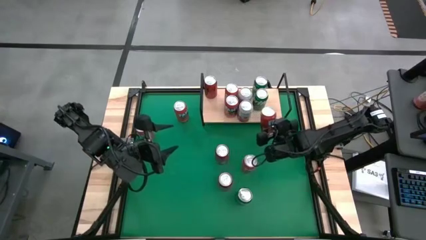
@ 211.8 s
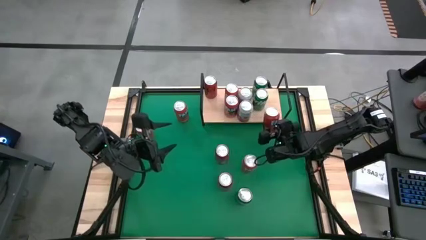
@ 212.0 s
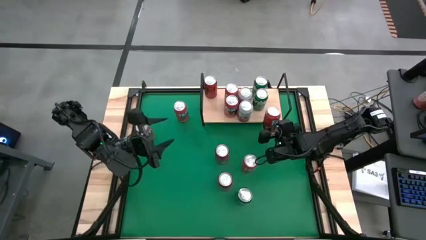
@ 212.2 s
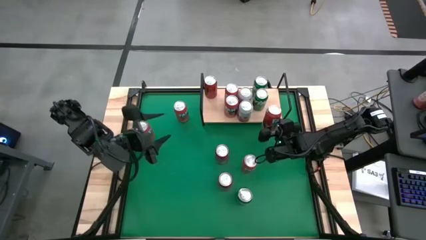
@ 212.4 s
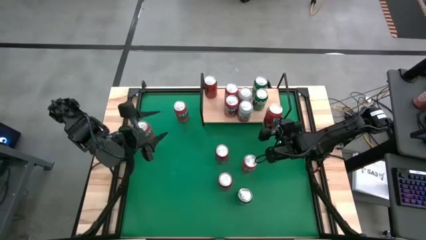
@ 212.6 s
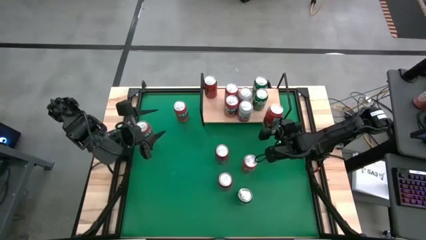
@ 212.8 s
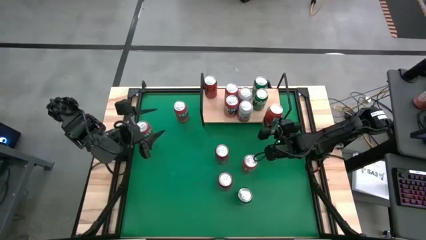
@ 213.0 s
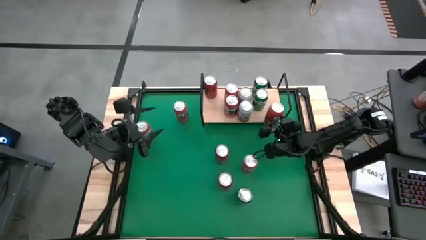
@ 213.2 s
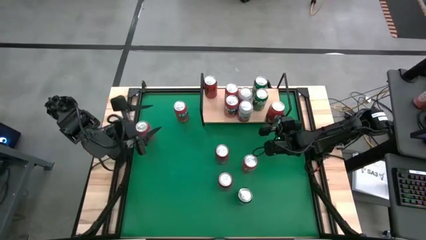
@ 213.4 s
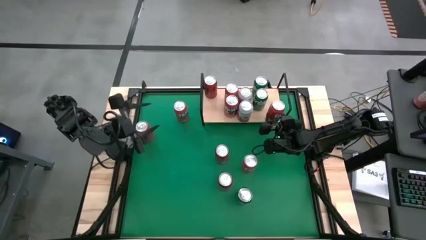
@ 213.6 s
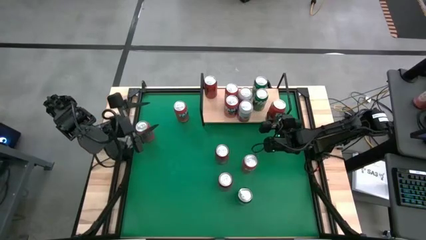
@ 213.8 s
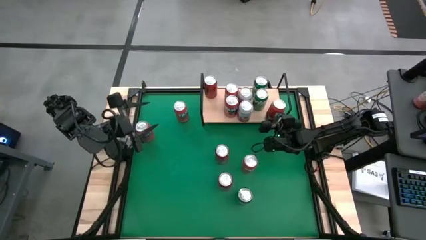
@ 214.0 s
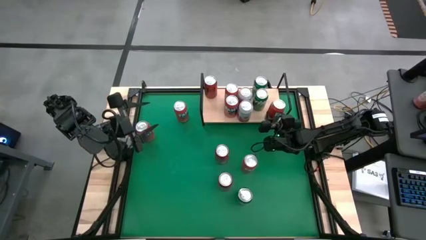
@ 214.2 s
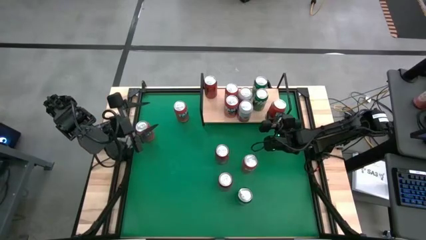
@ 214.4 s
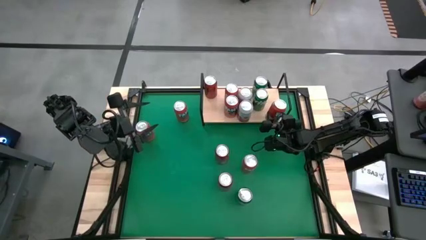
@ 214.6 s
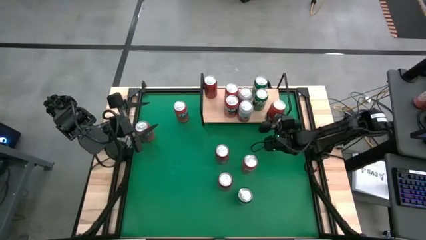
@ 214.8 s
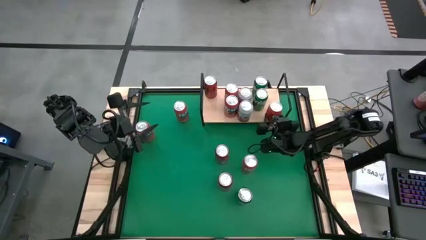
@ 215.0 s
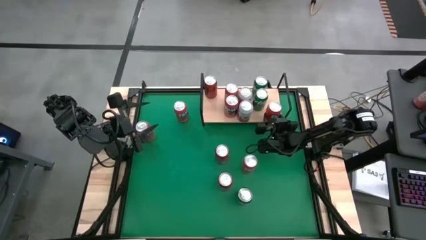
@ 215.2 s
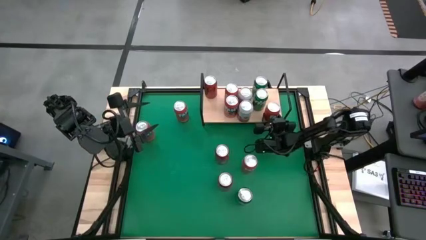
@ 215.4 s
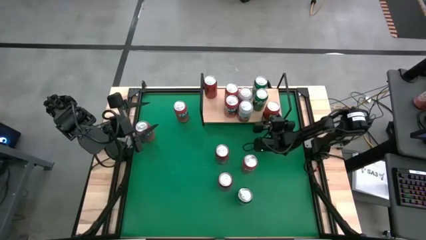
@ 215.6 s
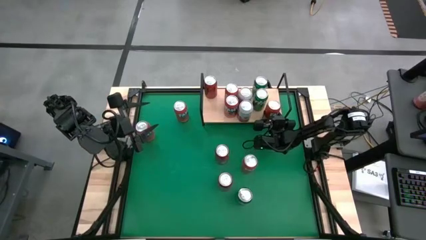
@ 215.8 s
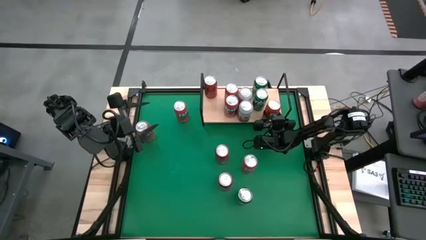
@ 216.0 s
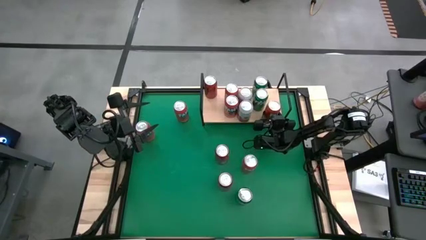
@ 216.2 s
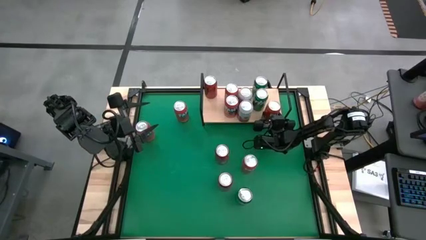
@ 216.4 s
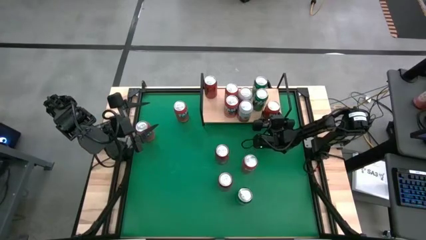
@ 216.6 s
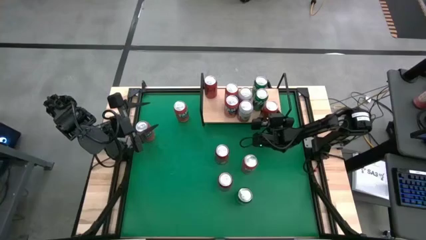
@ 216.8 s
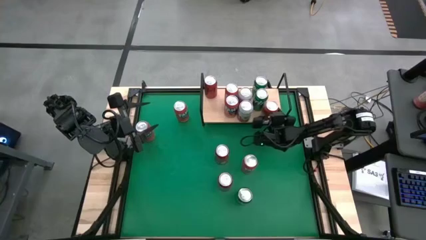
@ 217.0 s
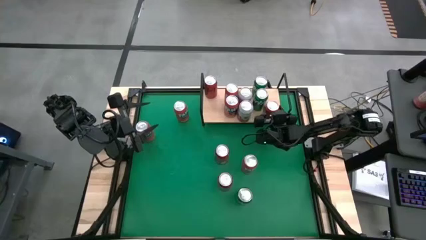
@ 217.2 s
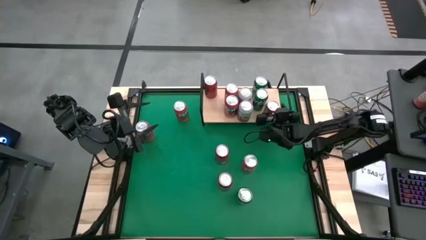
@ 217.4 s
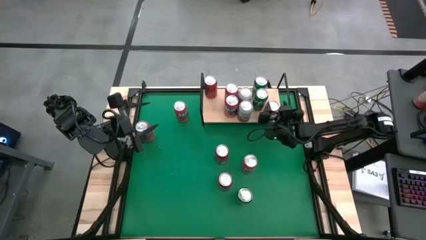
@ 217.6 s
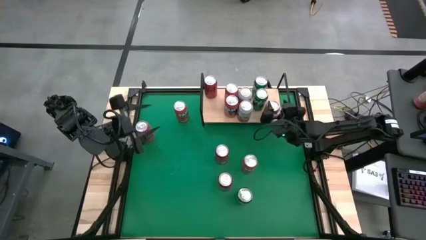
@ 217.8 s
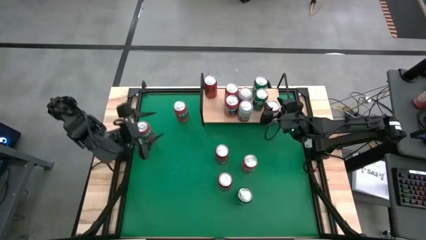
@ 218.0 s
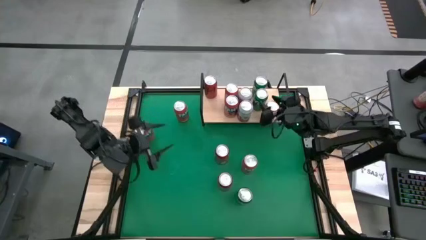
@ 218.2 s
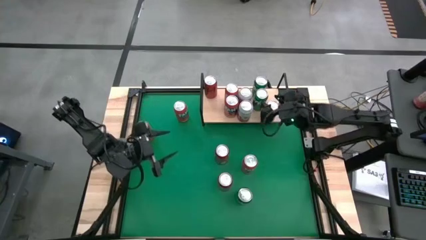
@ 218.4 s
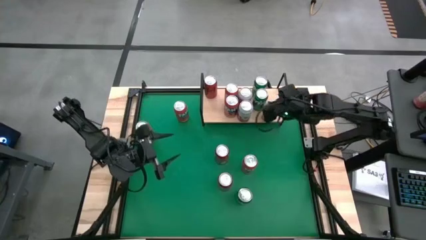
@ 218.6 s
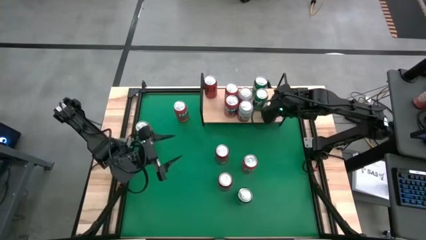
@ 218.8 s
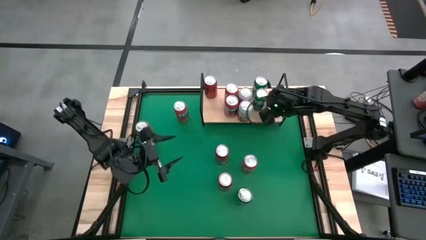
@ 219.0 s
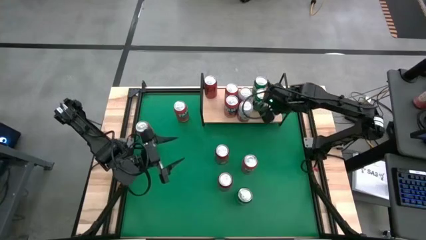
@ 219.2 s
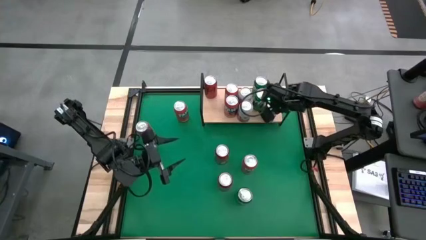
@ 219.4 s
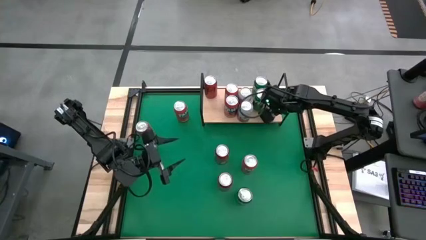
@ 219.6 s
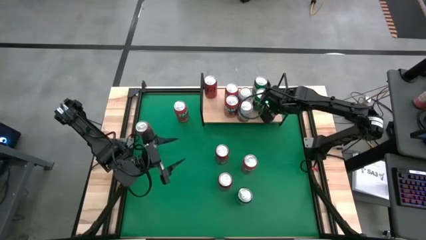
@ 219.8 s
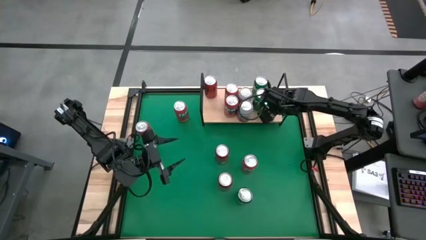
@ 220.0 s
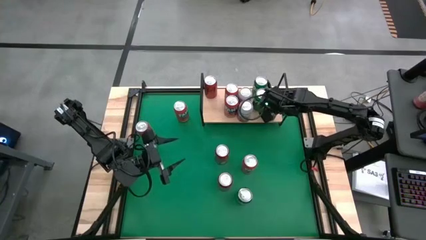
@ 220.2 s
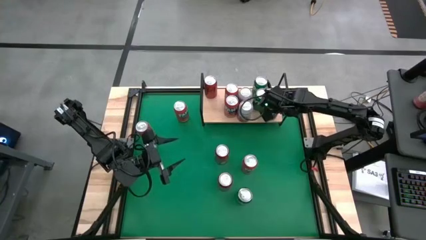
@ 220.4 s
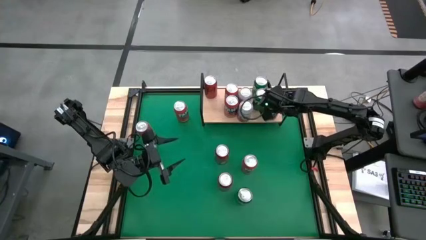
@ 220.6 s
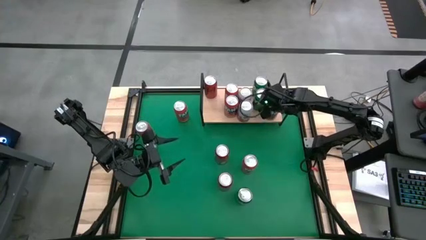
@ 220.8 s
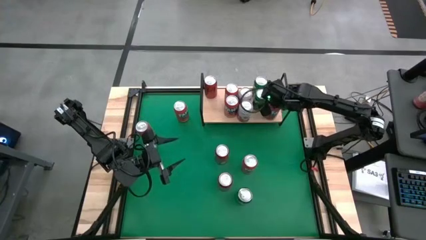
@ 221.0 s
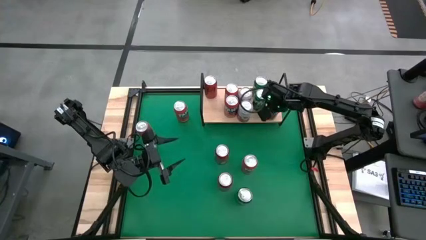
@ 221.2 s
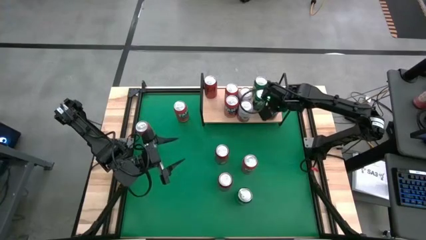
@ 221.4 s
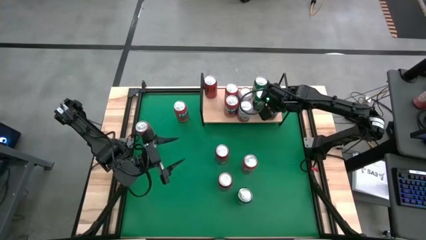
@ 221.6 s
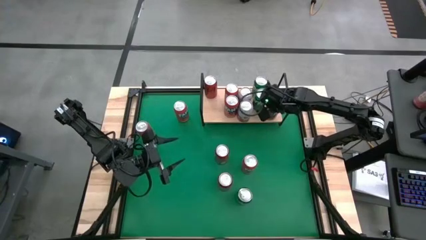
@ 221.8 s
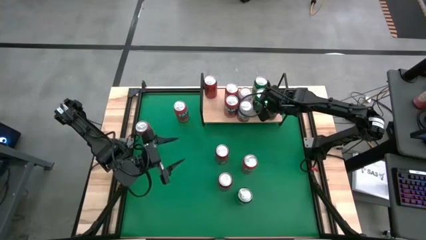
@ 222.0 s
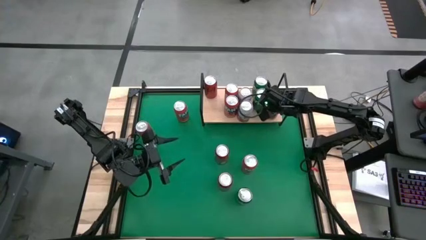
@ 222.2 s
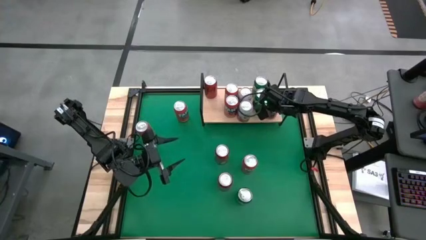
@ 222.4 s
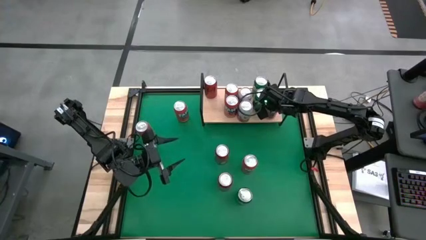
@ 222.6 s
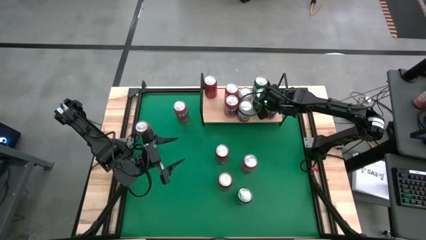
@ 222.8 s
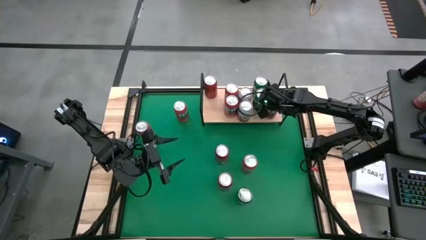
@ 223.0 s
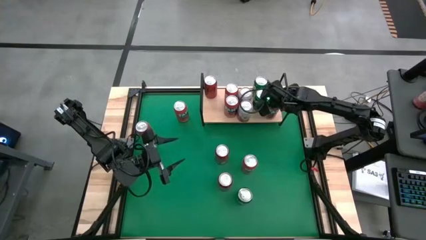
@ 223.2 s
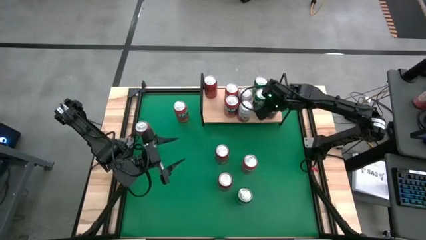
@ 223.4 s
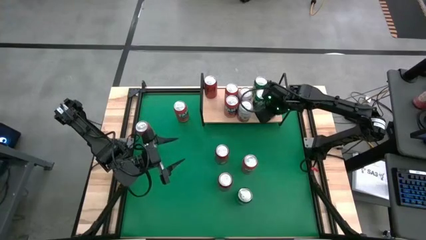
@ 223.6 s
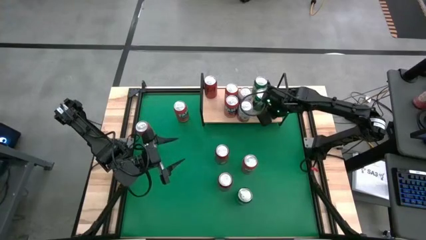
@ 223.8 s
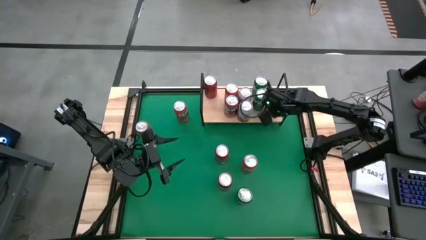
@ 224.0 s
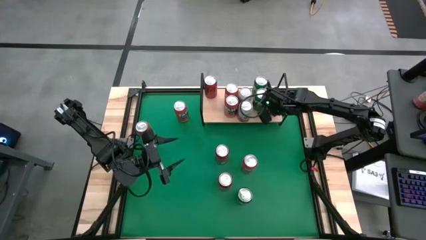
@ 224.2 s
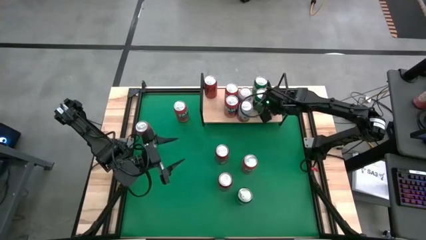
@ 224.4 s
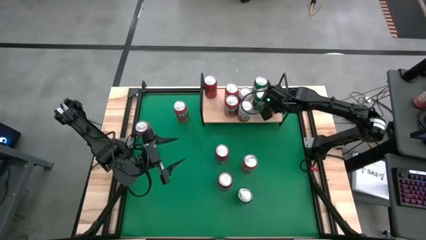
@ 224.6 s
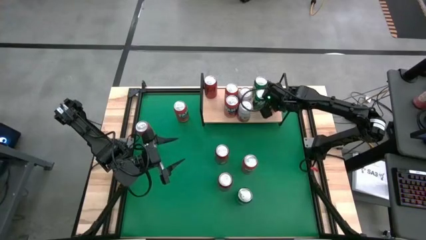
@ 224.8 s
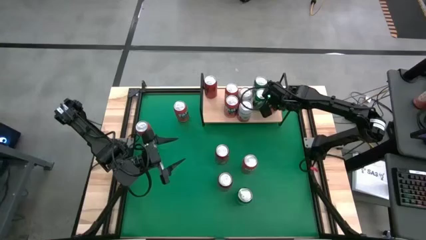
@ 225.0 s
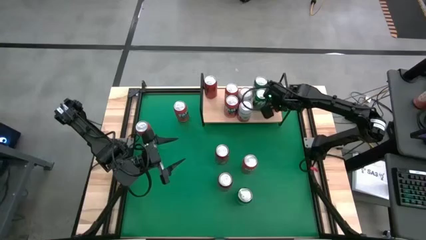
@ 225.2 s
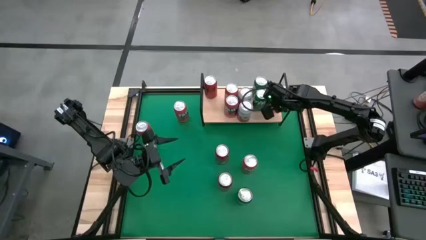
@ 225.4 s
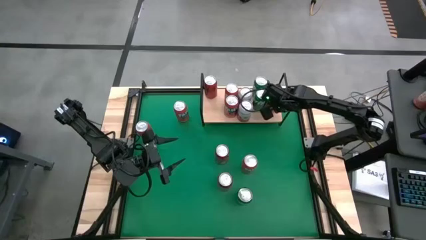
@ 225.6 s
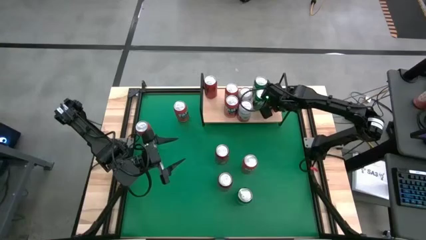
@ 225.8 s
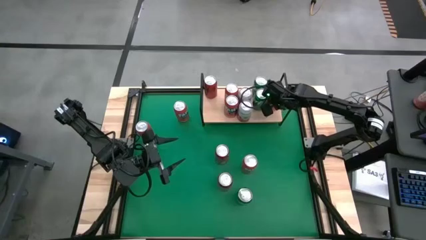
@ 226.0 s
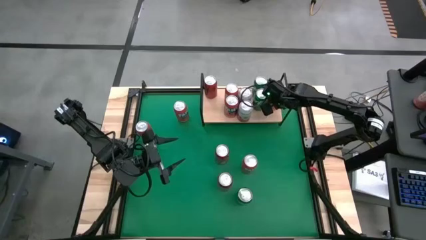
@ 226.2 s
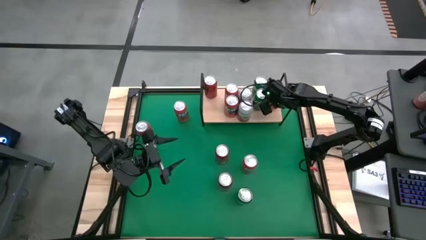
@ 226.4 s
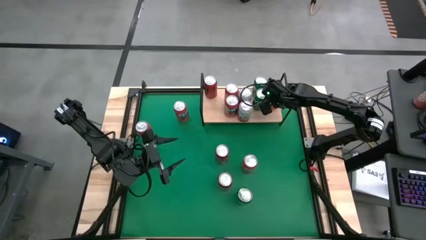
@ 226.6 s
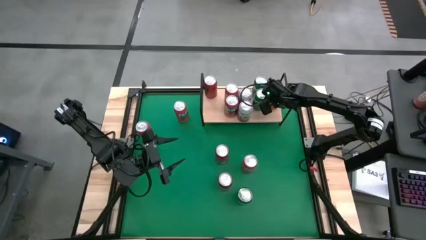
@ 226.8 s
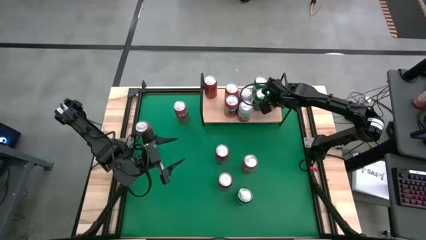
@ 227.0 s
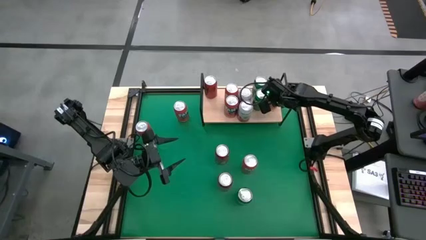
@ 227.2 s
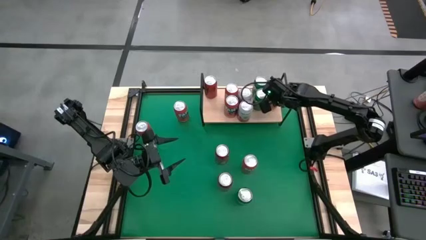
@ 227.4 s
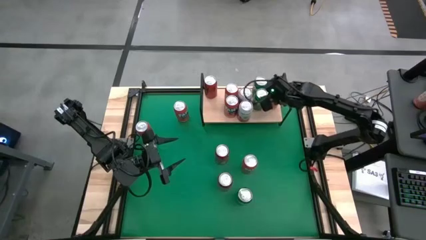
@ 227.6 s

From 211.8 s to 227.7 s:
Task: Place canned beverage on shelf
Put the red soda can on the shelf
